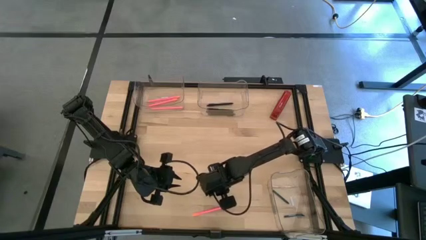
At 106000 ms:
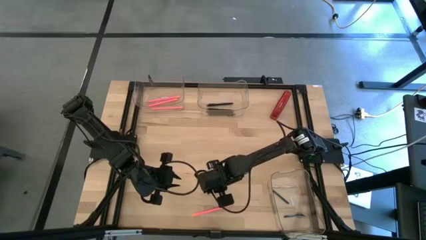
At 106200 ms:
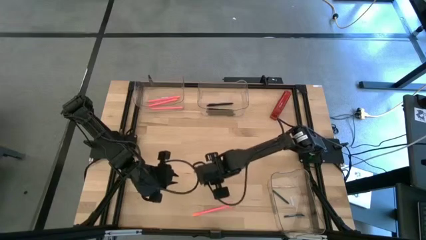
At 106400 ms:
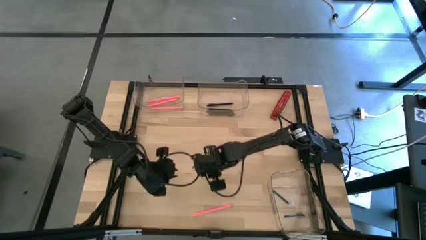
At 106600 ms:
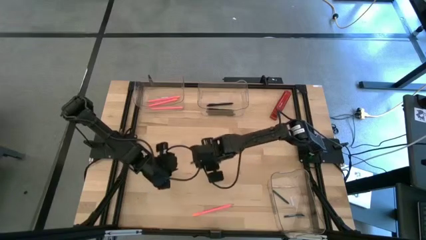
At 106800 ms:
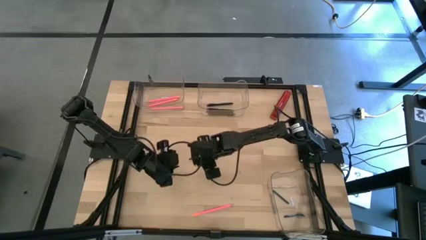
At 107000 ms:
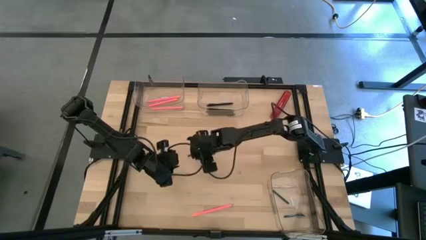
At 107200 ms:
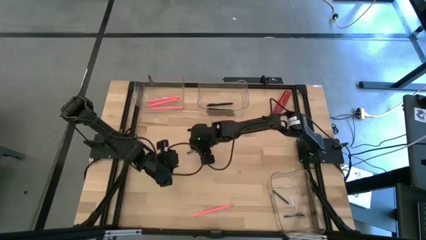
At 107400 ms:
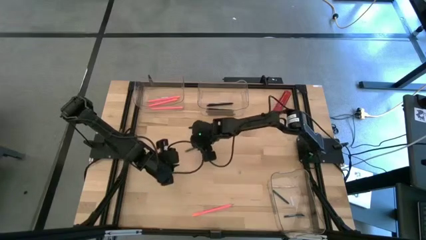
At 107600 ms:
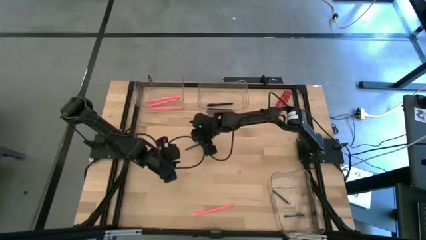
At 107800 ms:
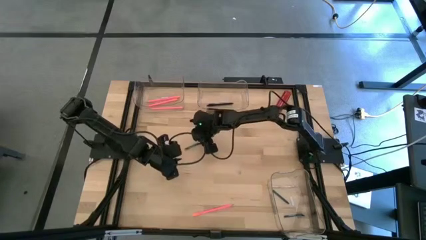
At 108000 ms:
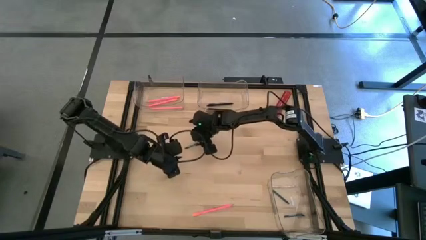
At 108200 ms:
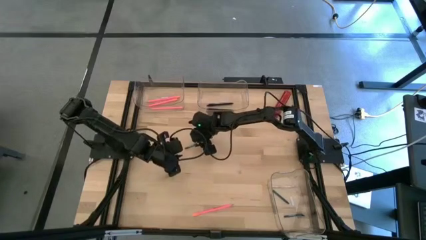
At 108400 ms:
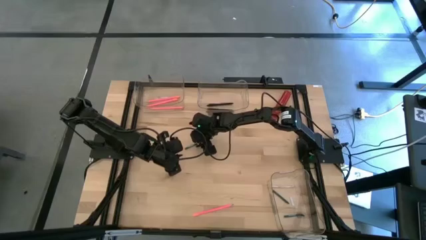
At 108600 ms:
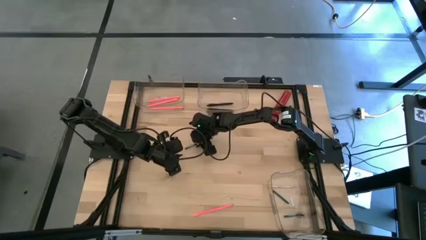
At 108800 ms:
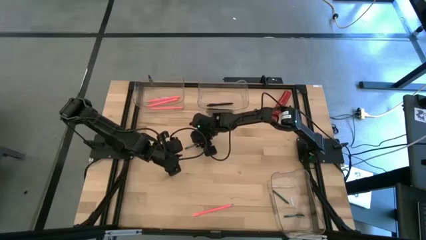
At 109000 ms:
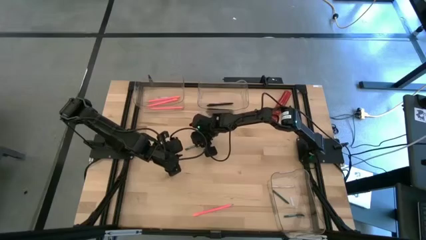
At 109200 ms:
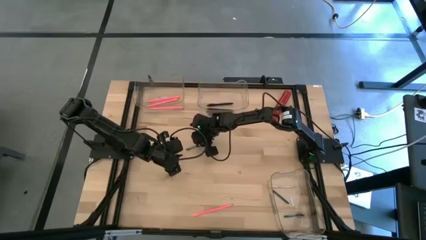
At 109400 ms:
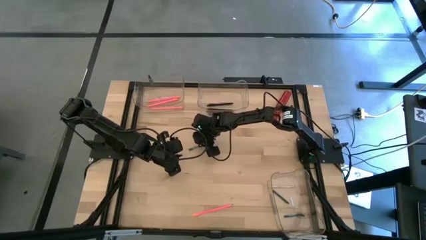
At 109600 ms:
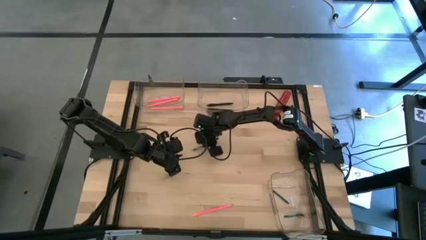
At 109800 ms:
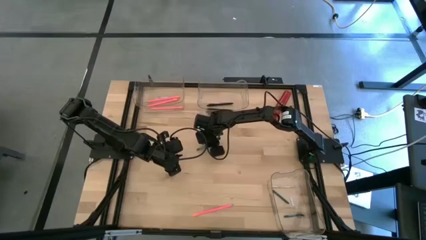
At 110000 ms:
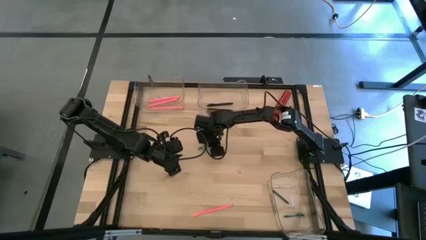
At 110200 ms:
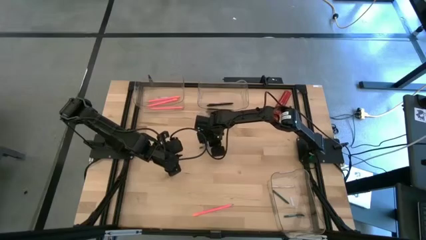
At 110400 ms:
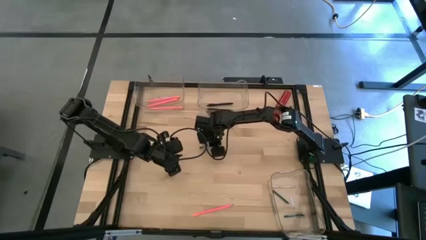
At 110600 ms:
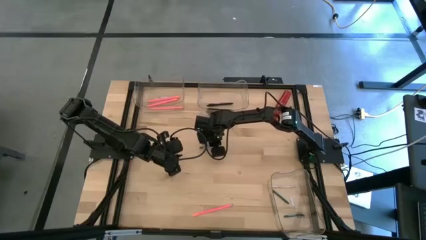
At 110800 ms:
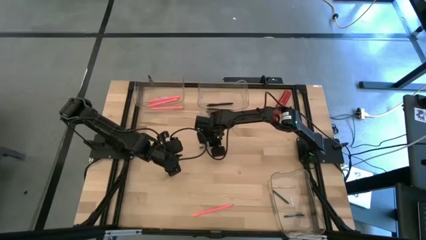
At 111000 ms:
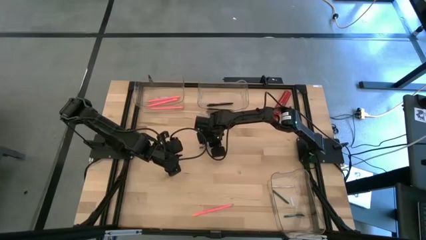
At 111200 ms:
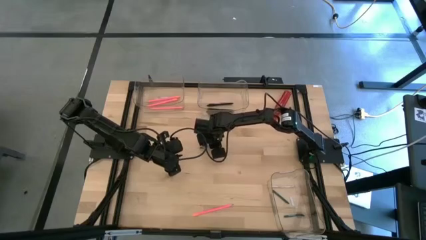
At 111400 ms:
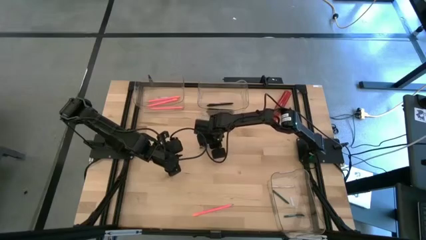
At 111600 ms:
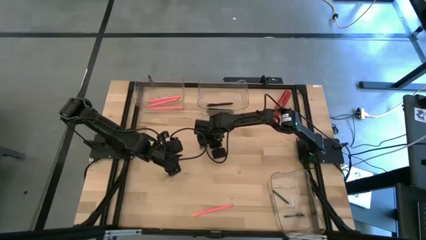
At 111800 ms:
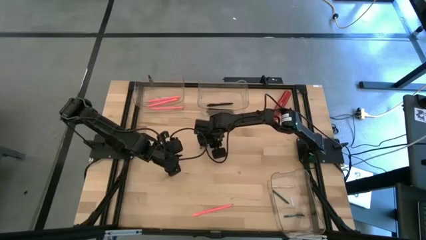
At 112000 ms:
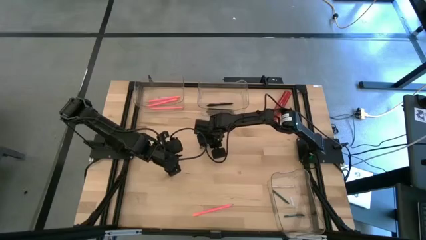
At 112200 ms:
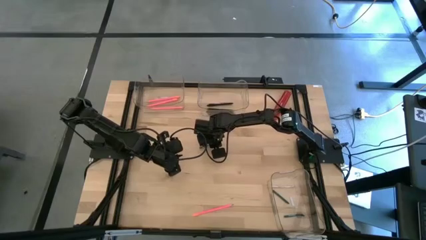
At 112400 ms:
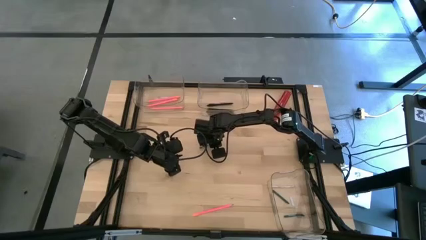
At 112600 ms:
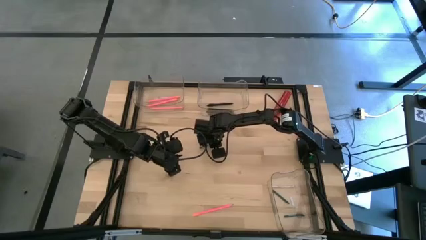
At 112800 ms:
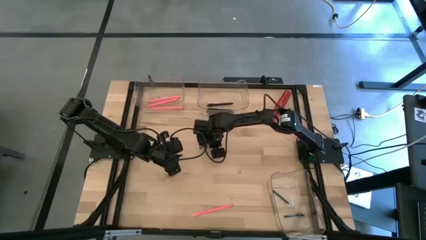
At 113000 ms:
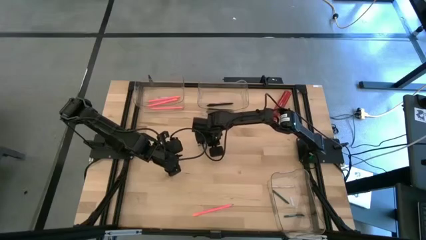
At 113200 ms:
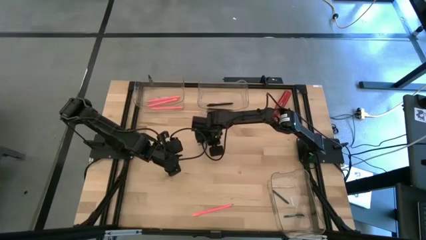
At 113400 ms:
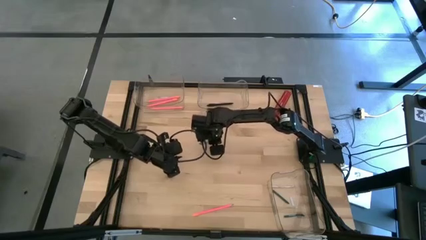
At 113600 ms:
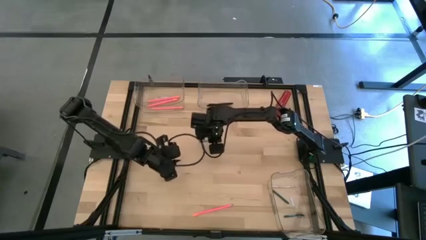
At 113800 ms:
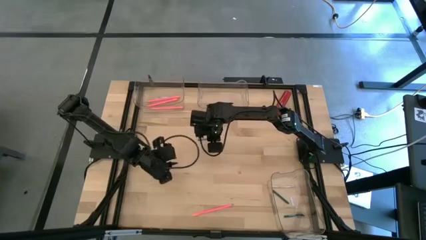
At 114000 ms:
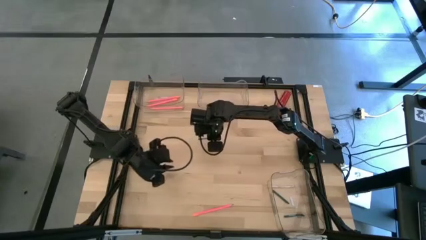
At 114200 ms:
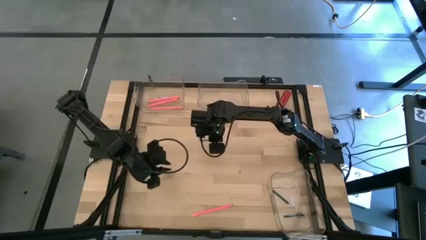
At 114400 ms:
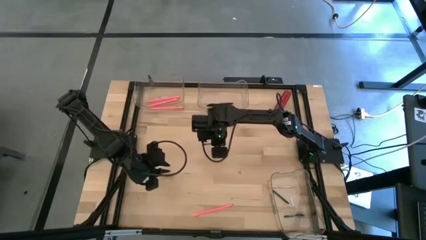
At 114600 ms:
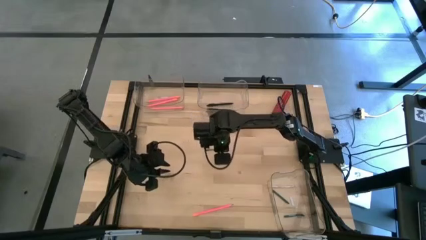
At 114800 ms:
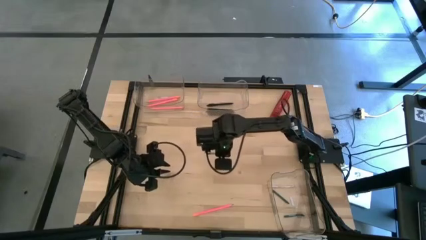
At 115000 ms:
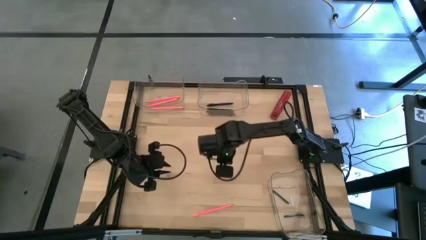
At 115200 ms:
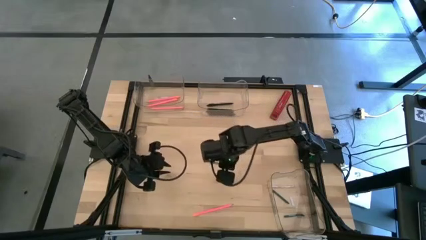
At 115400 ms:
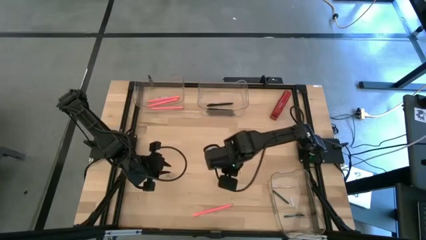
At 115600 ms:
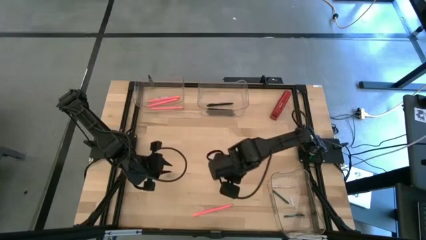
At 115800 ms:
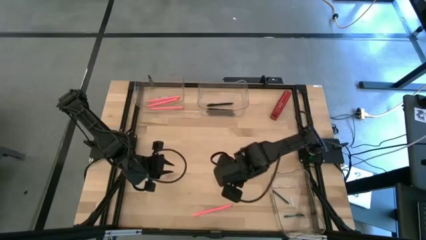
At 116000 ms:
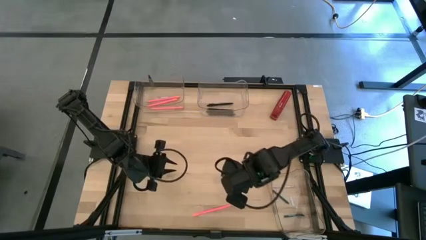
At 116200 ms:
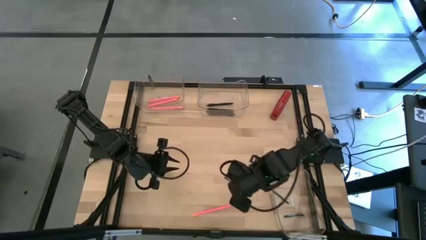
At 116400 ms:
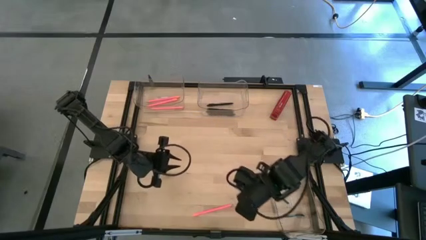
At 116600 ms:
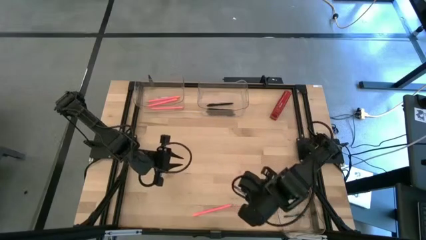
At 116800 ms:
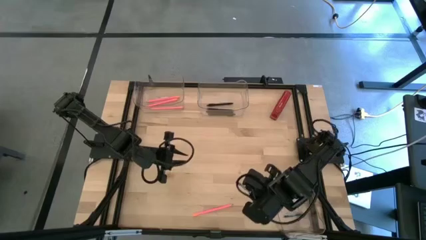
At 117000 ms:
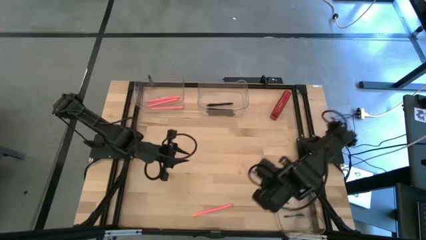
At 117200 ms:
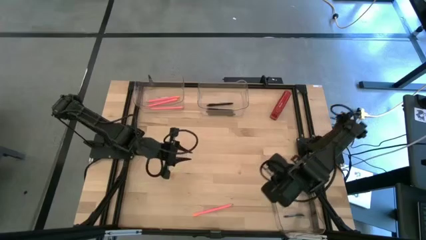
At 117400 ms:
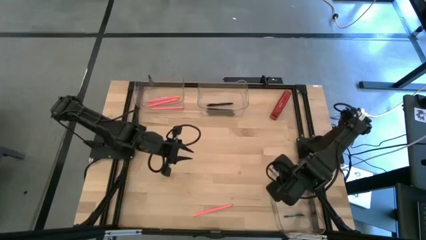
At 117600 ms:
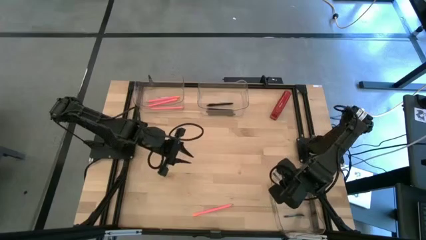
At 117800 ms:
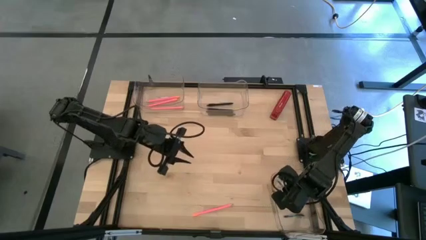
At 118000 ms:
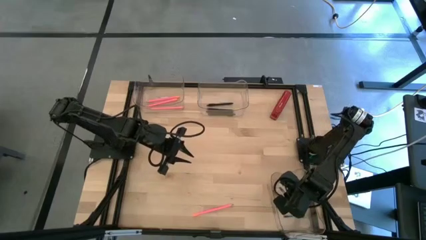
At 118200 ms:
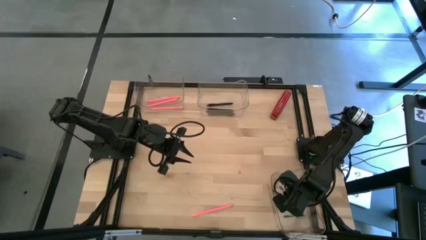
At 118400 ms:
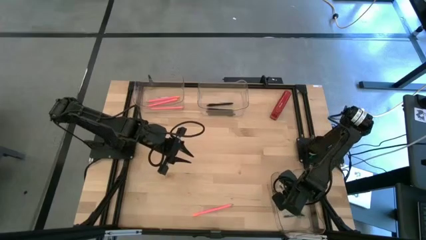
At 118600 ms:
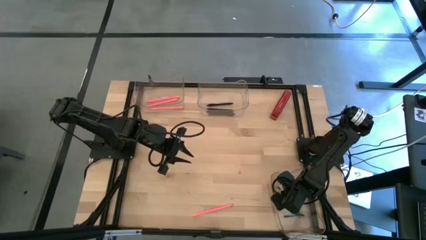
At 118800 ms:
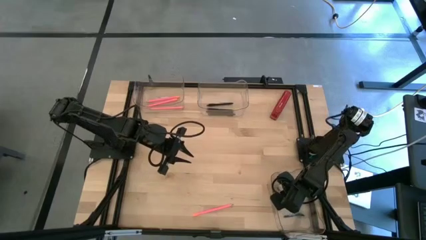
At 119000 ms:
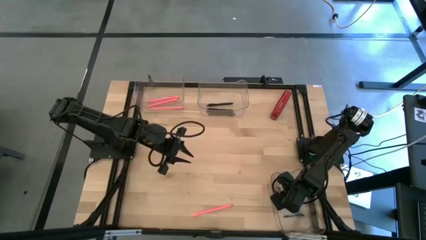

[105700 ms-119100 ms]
Task: Sort crayons/erasers/pens/pencils in bins
Put the green crayon into the bottom transparent bin
